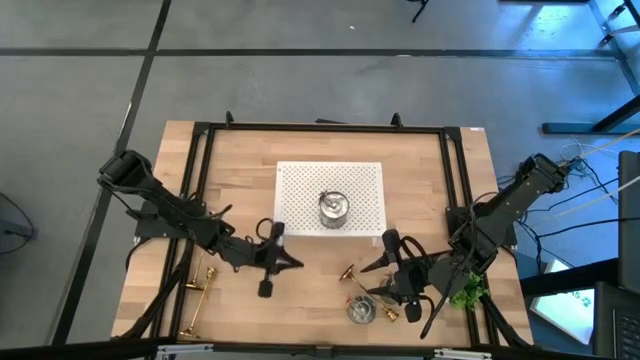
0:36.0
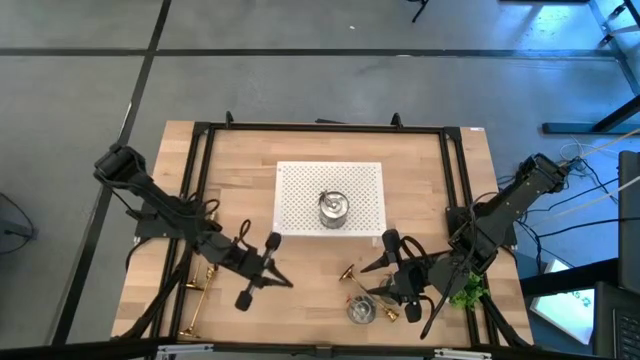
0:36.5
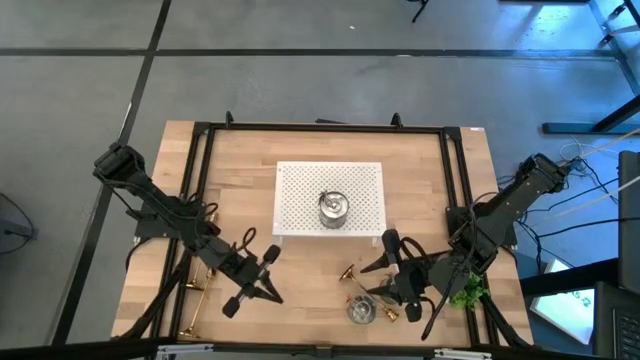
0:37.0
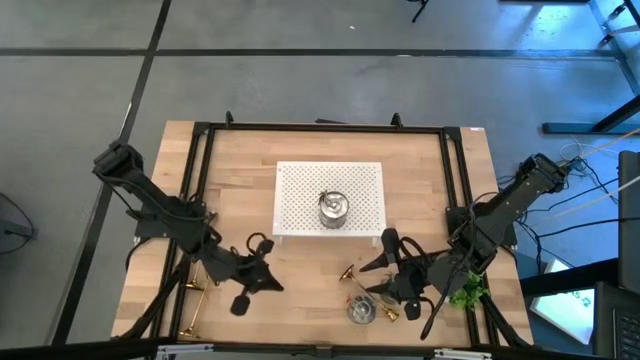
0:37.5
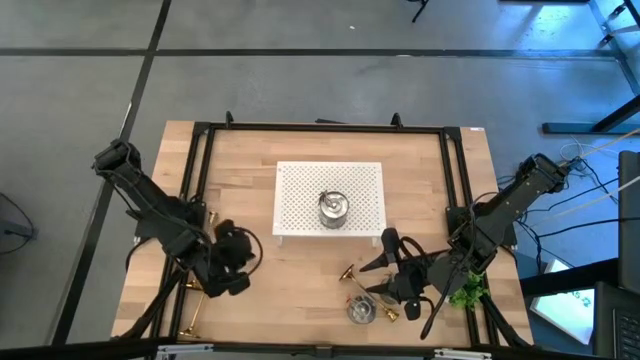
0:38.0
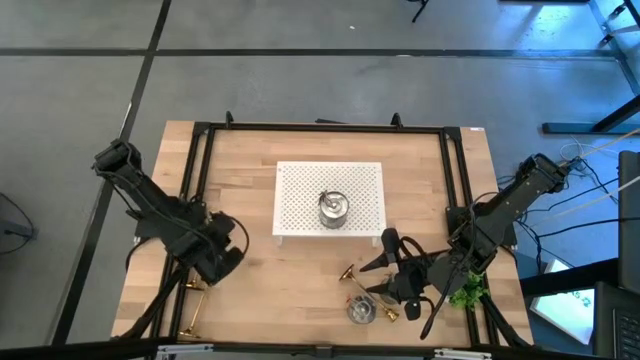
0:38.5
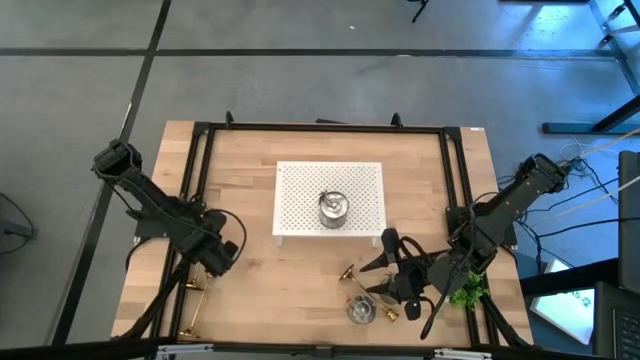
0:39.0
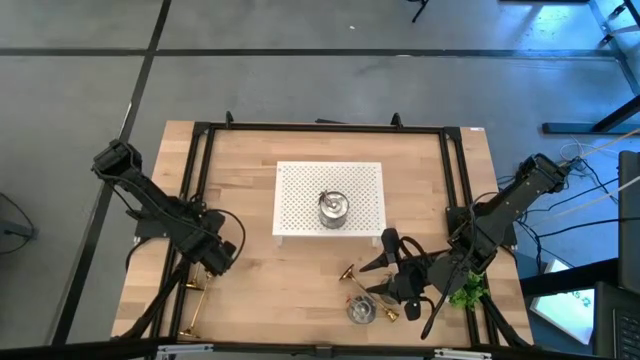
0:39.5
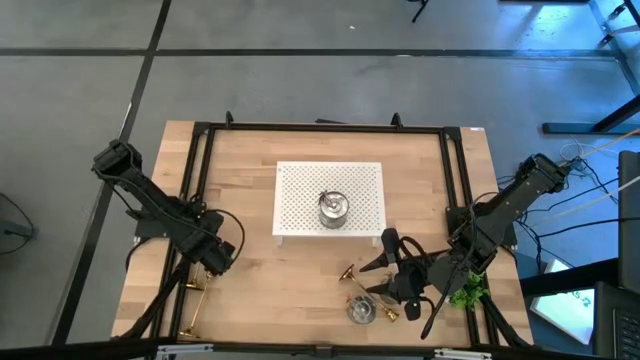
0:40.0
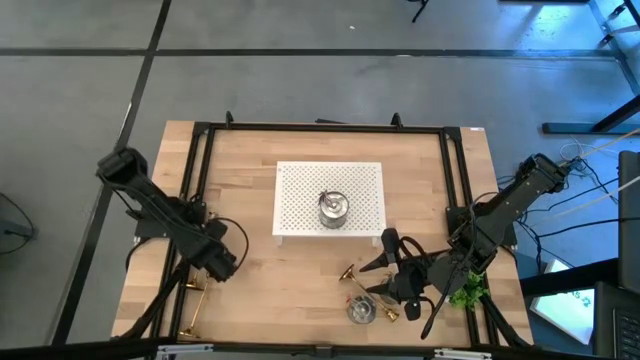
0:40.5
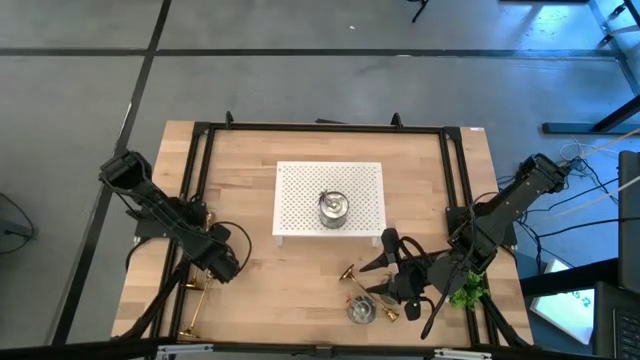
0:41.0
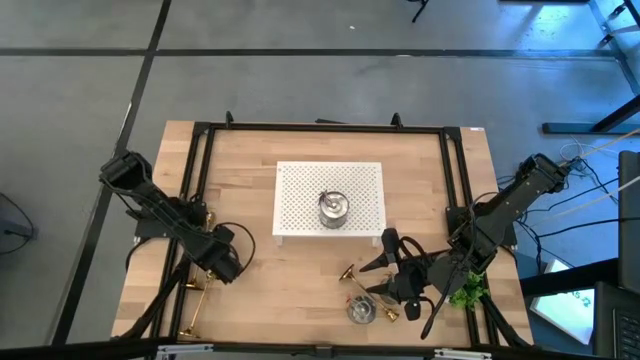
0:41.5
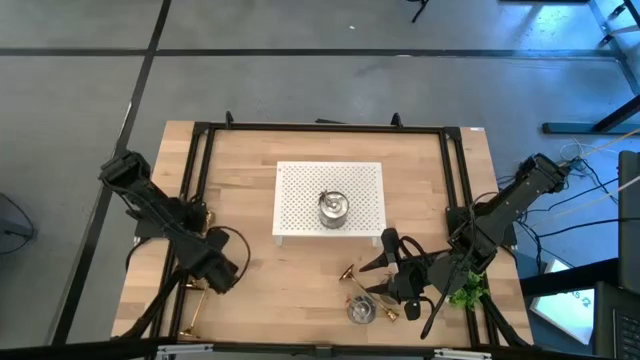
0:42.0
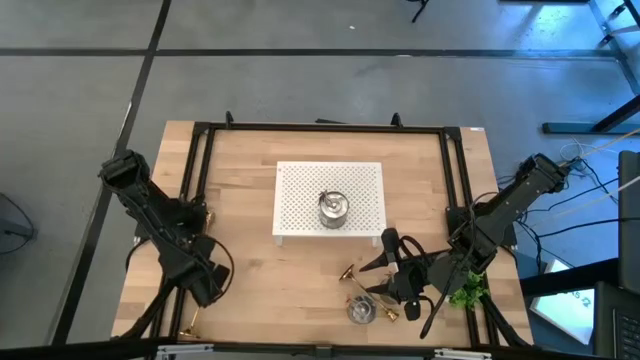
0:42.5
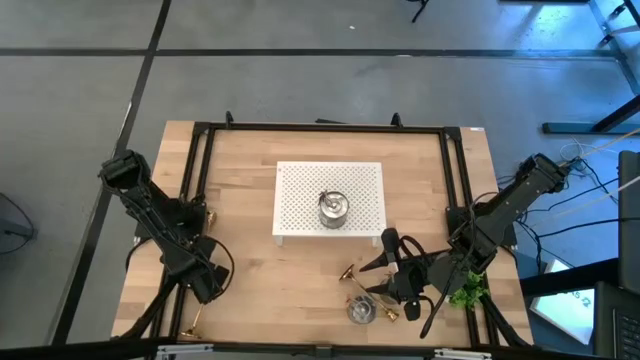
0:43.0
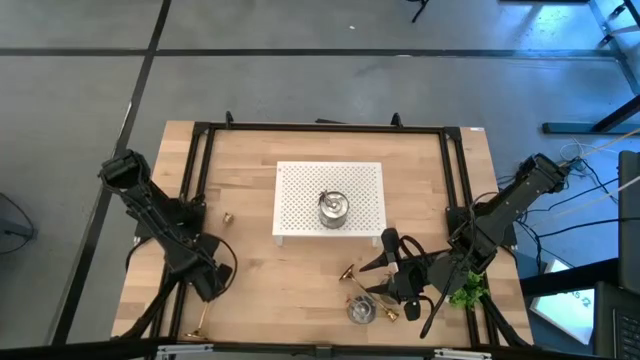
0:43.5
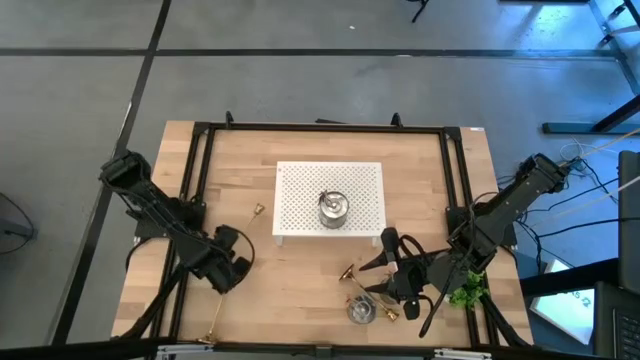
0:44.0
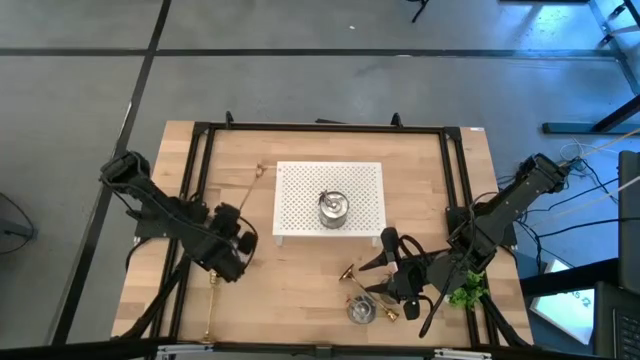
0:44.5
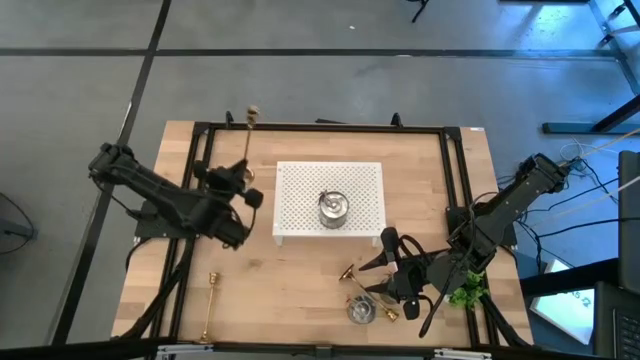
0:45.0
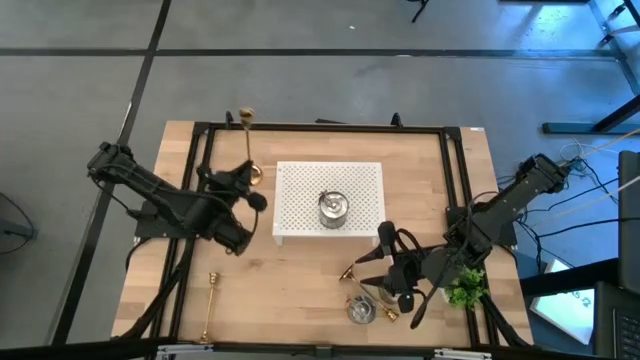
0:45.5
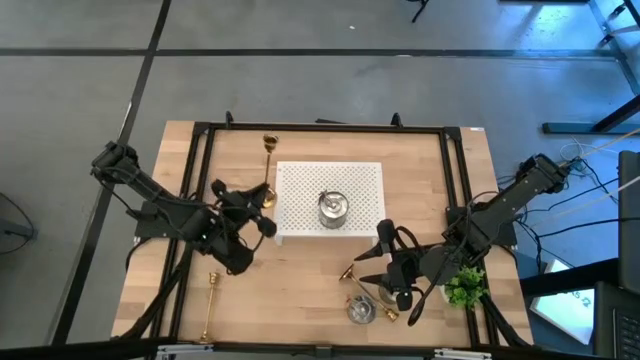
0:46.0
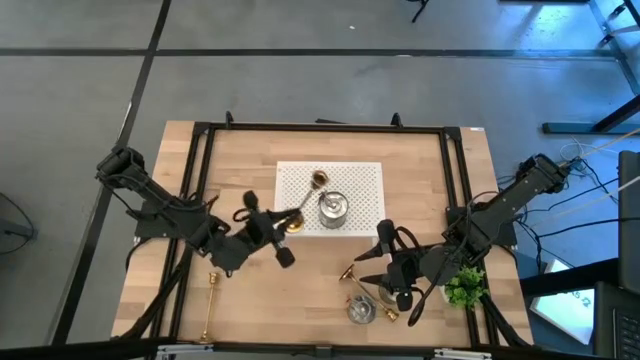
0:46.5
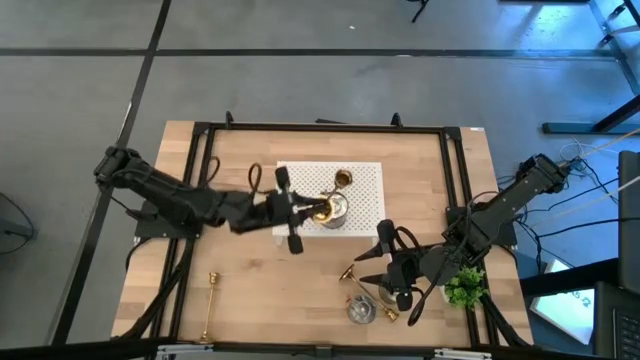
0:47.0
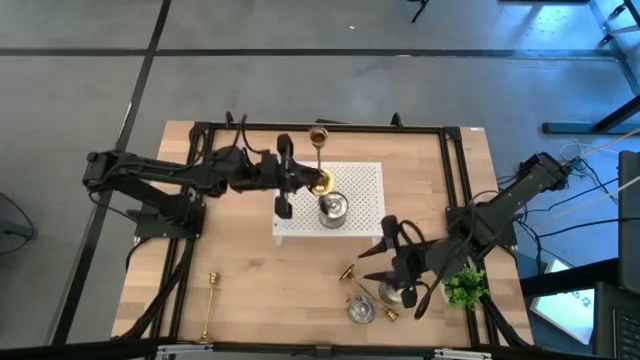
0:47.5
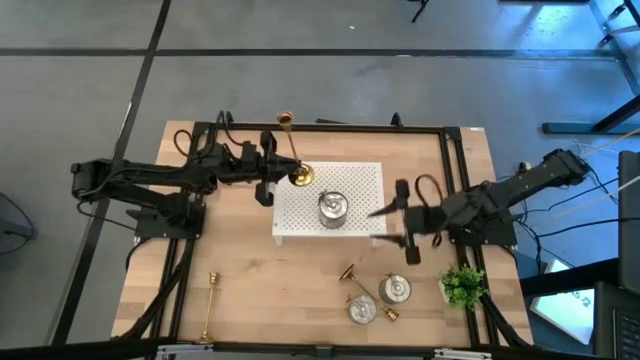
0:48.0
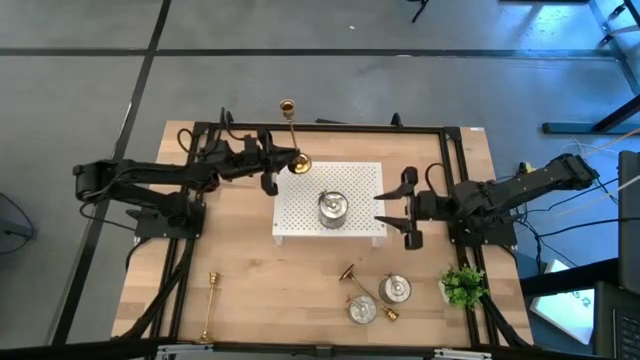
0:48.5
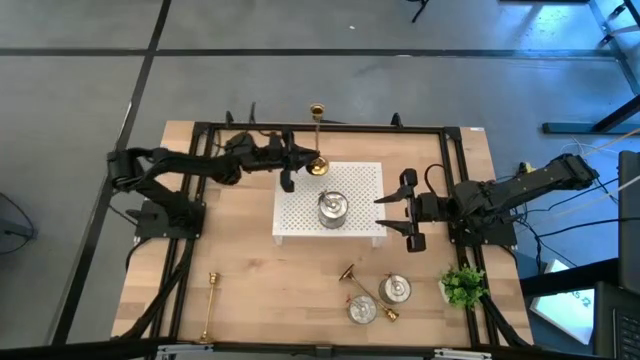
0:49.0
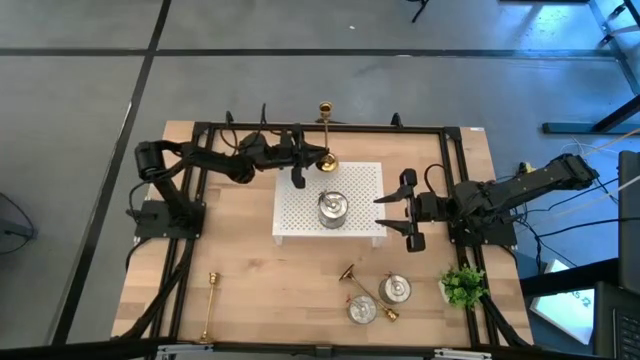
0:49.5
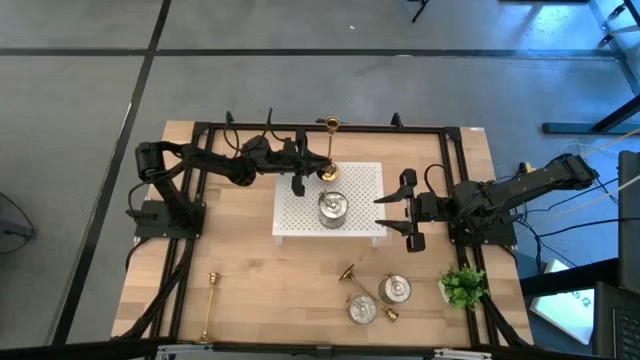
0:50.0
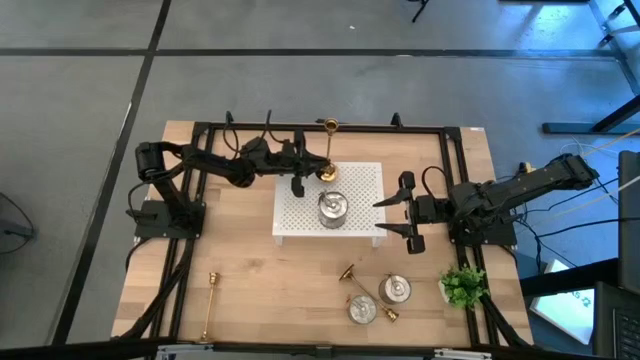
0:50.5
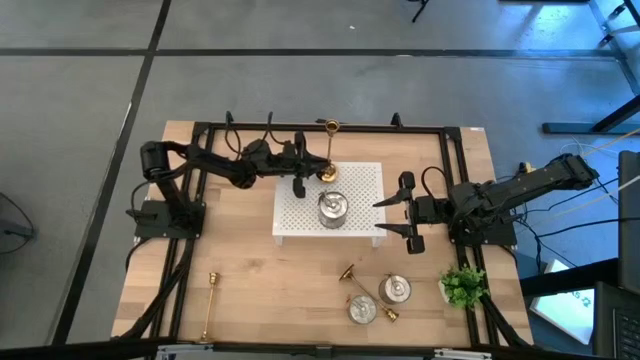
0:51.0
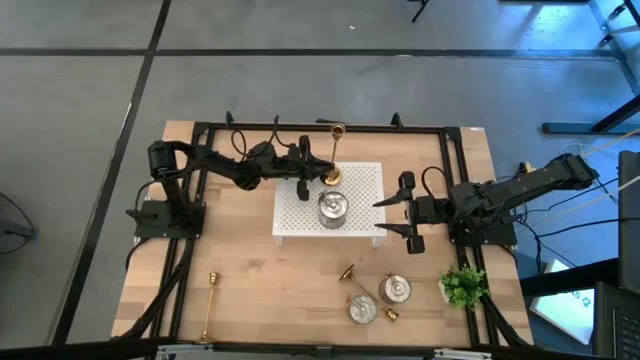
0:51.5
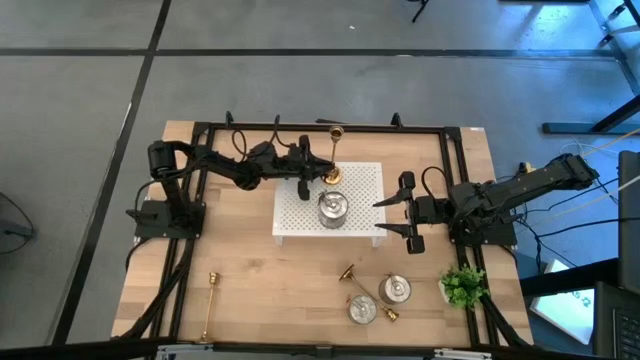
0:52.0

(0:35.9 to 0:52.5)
Task: Pick & Place candle stick holders
Put the top gold candle holder on the shelf

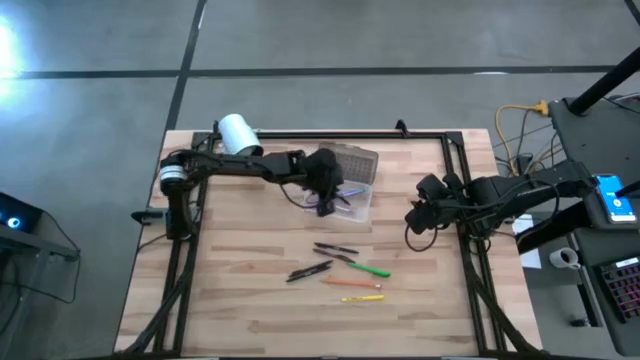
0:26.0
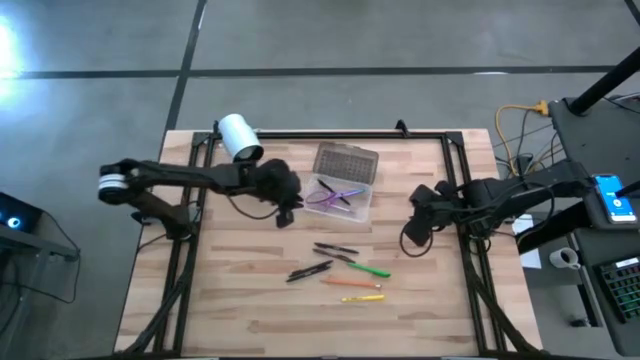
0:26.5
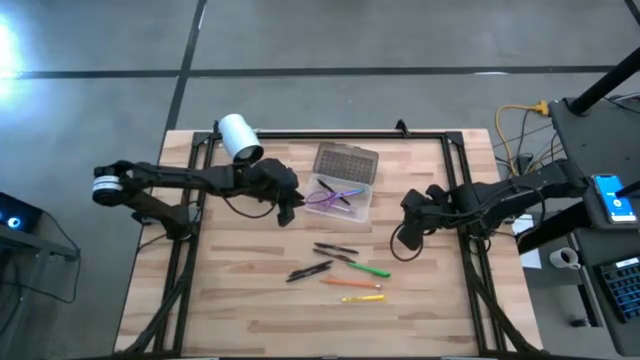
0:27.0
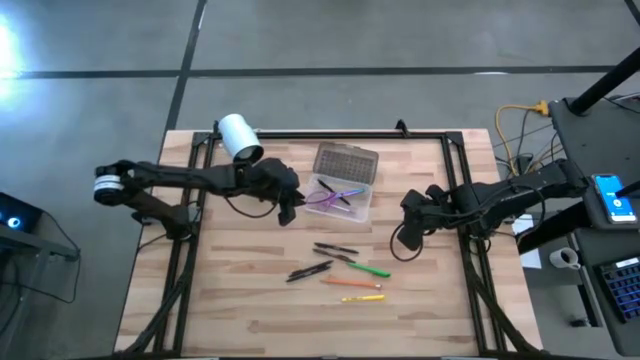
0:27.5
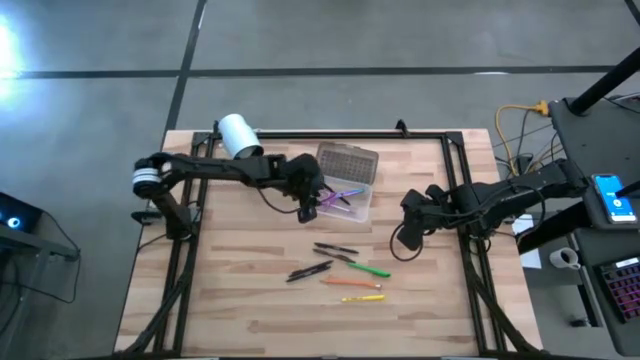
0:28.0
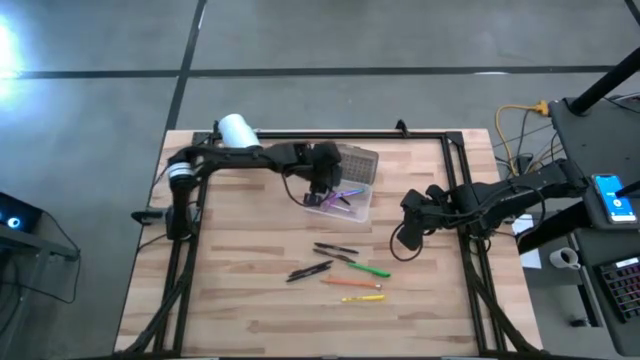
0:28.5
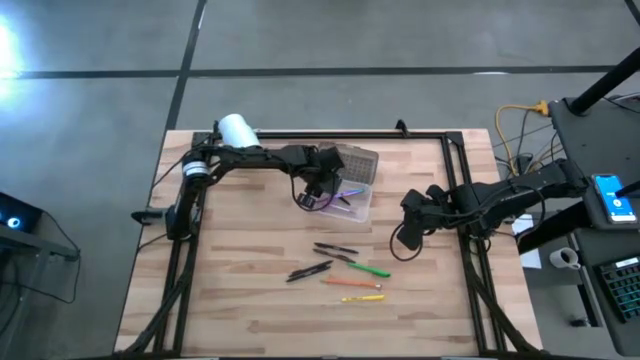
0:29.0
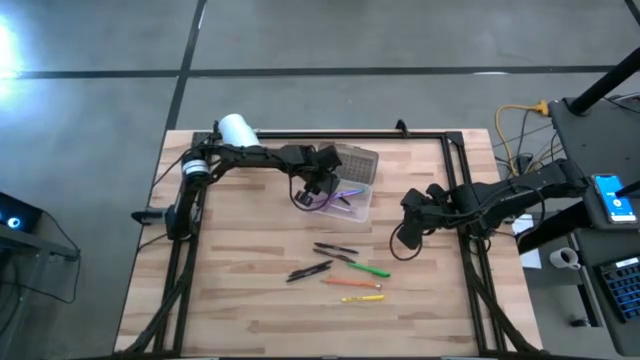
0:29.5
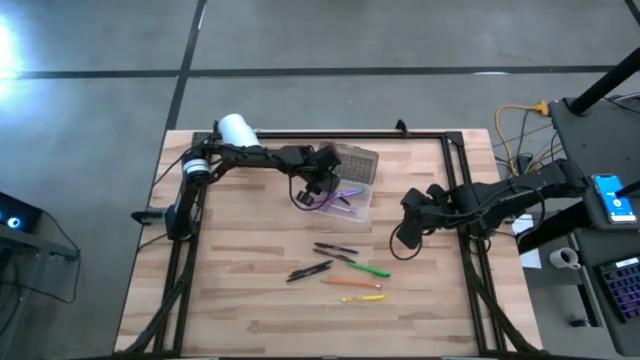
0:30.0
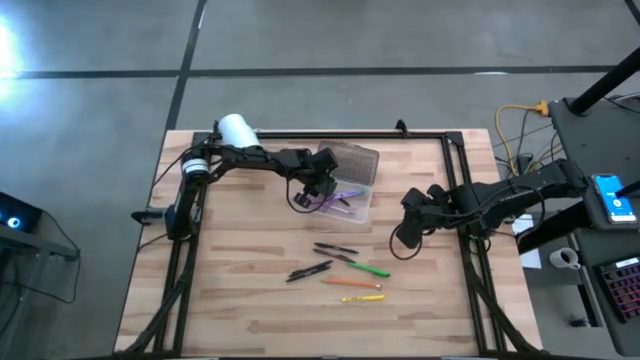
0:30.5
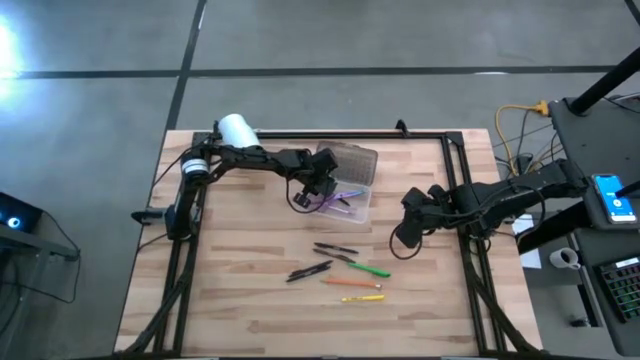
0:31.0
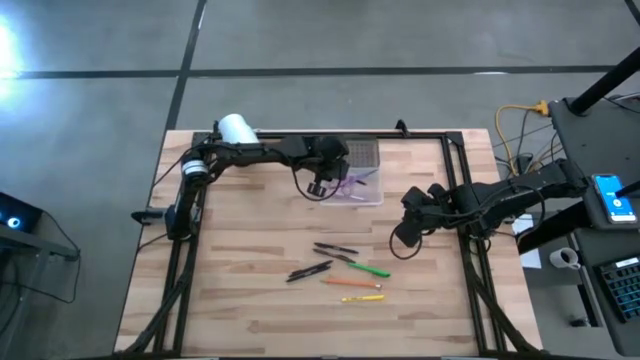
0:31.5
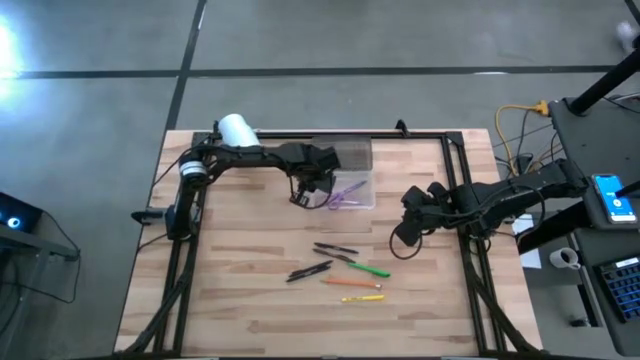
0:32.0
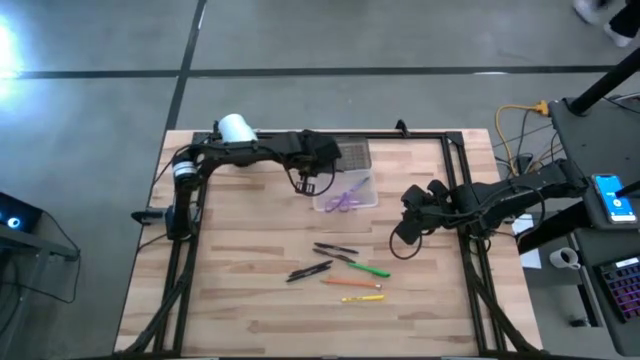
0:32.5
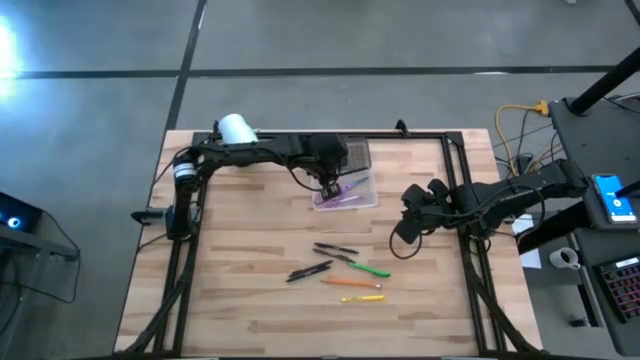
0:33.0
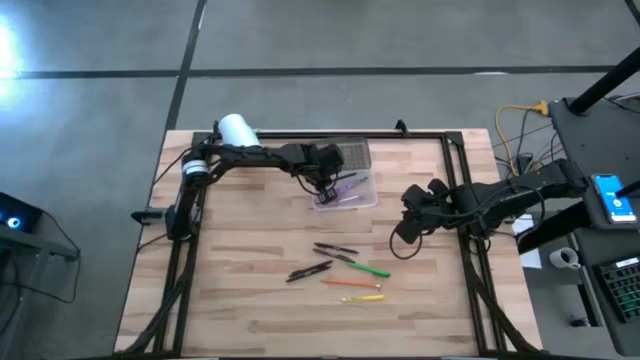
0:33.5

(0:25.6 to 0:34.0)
Task: Pick & place school supplies into a supply box
Adjust the black pen in the supply box
